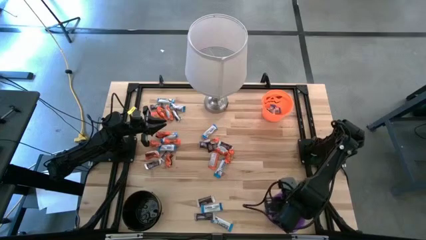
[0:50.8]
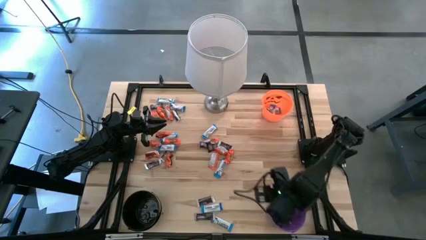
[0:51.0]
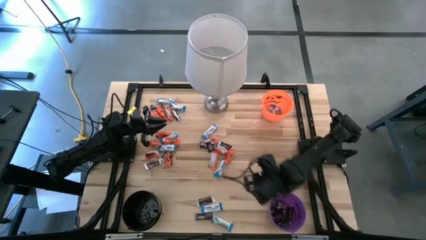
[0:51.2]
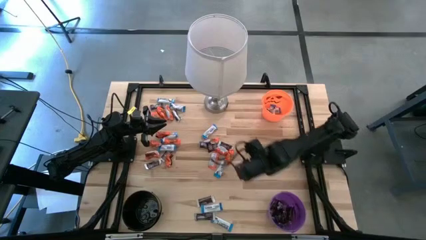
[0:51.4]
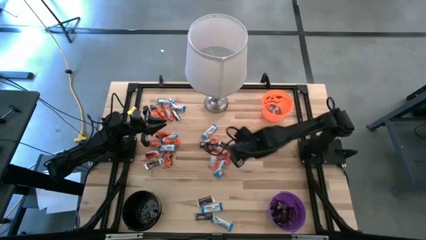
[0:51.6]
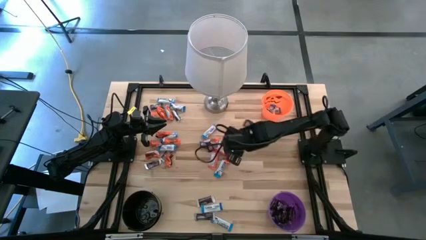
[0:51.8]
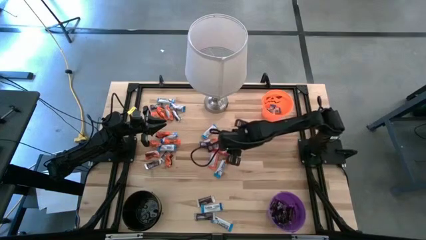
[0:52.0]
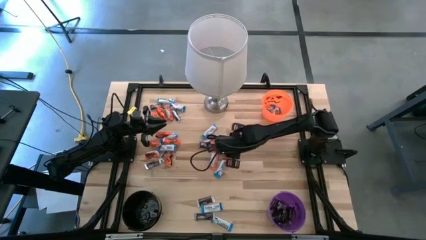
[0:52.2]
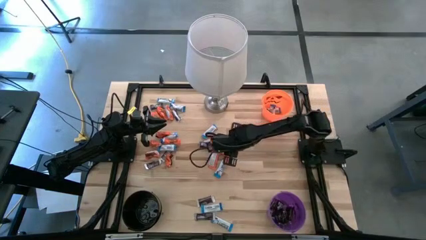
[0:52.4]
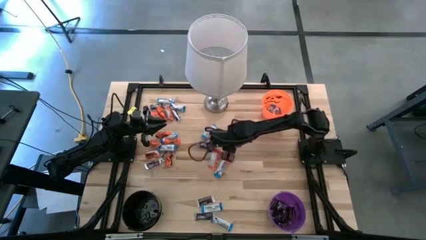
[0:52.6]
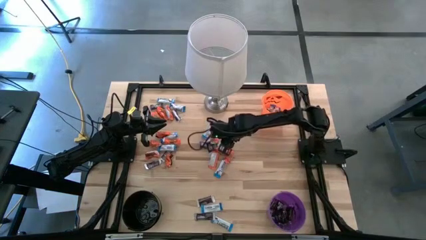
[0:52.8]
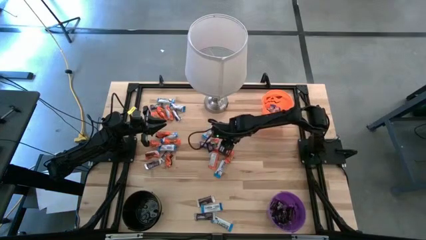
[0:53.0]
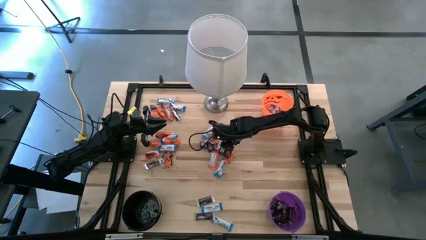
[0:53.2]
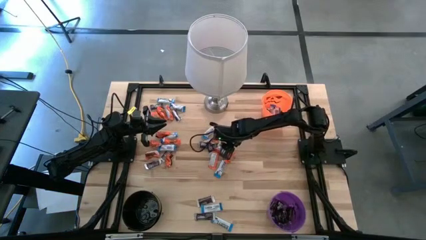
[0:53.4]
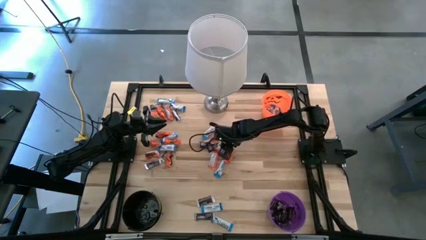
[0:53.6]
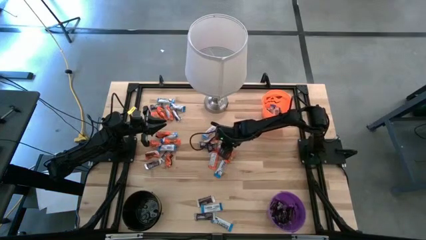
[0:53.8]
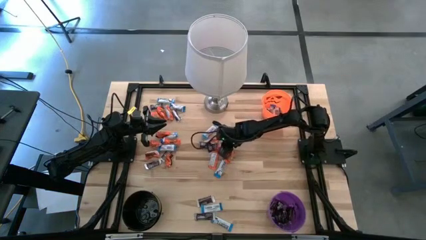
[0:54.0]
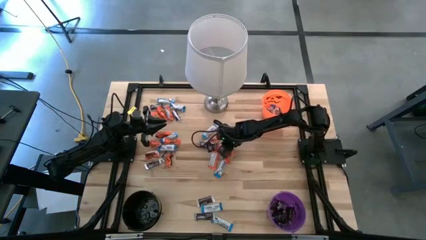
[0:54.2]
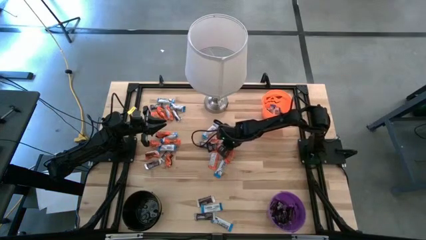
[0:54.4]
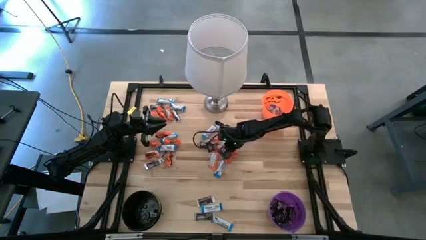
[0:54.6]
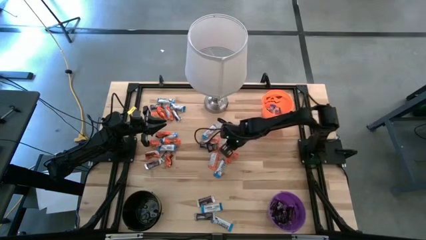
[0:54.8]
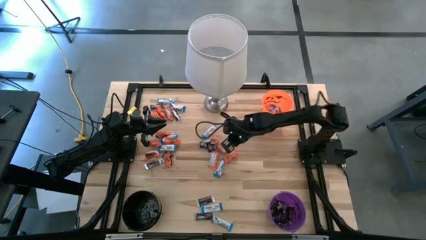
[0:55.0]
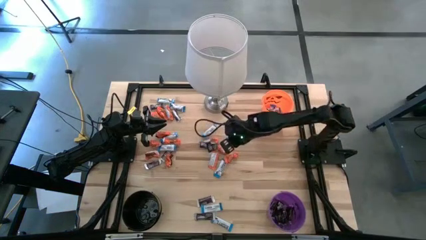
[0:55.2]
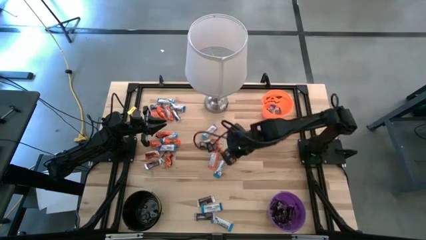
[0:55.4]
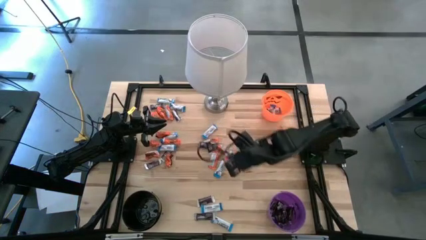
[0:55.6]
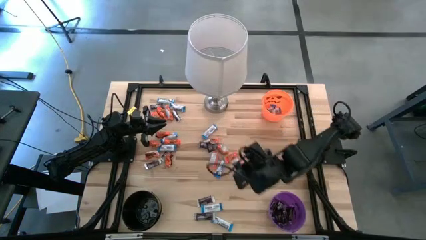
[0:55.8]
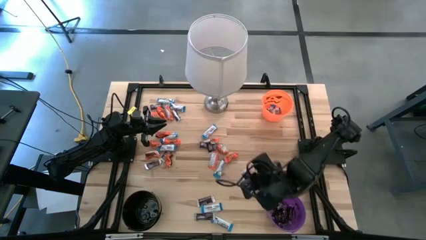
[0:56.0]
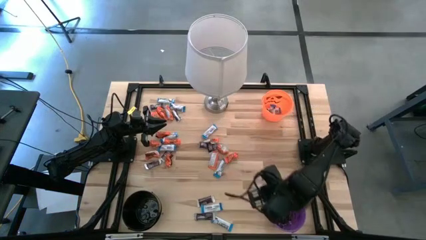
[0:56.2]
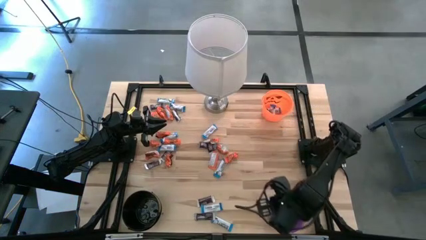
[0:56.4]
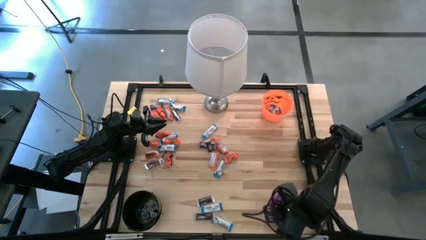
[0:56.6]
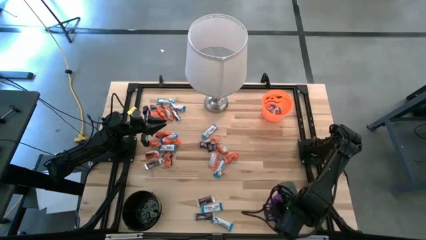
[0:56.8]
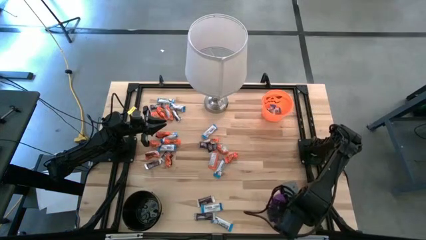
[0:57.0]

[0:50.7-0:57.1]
Task: Sort candy
Put the brown chocolate bar into the violet bucket

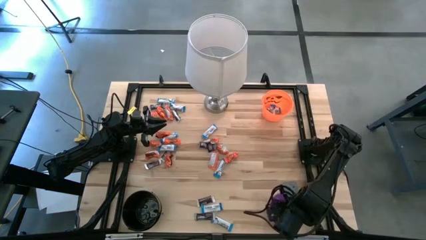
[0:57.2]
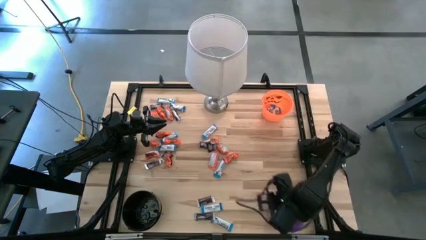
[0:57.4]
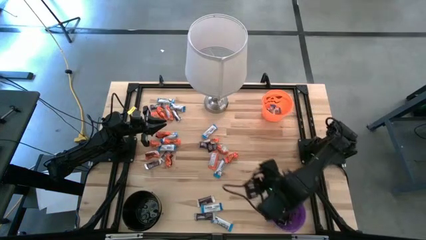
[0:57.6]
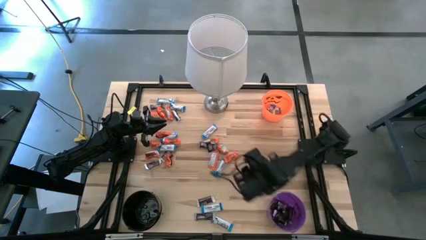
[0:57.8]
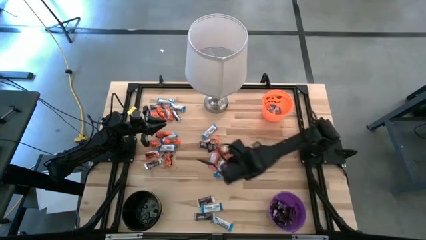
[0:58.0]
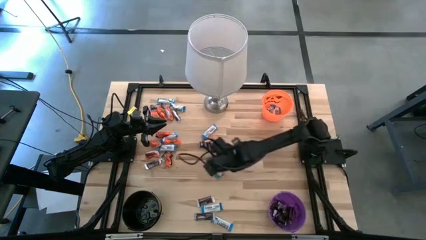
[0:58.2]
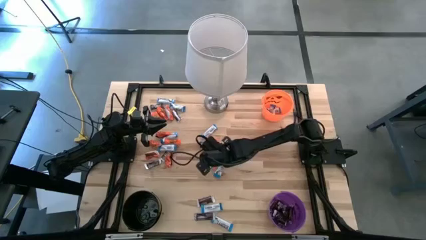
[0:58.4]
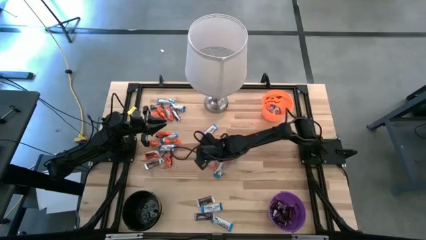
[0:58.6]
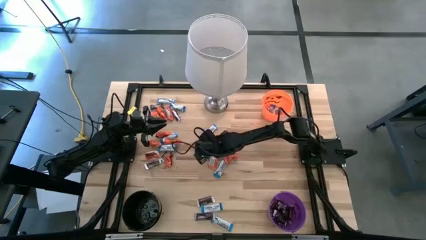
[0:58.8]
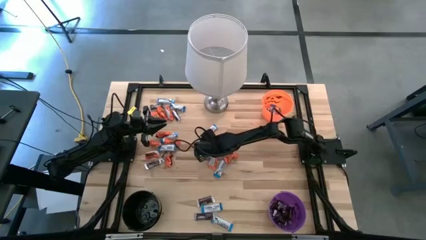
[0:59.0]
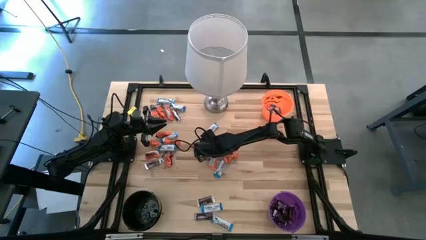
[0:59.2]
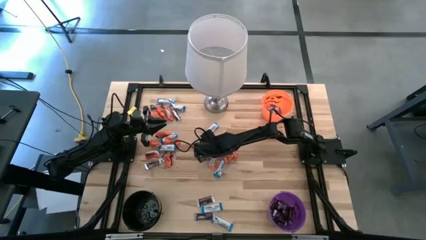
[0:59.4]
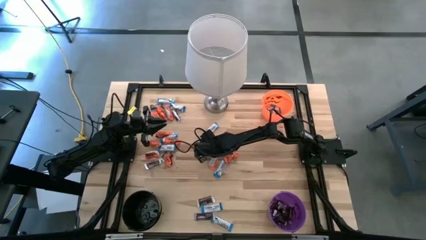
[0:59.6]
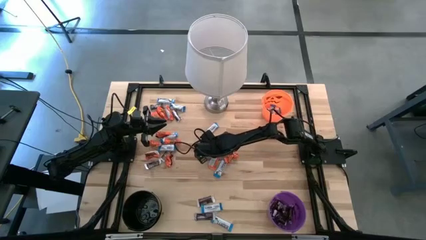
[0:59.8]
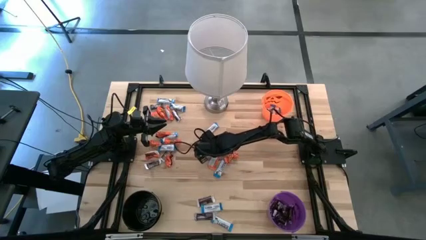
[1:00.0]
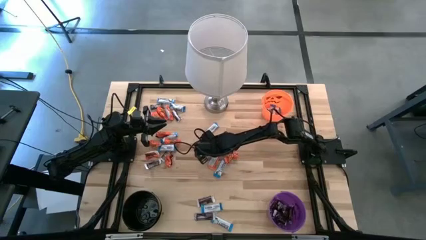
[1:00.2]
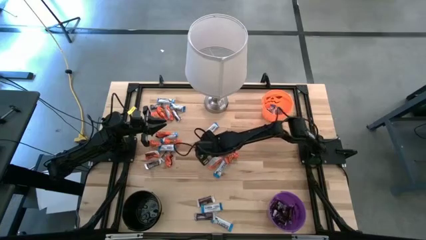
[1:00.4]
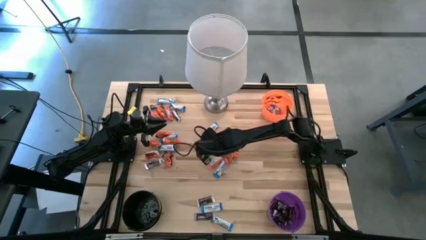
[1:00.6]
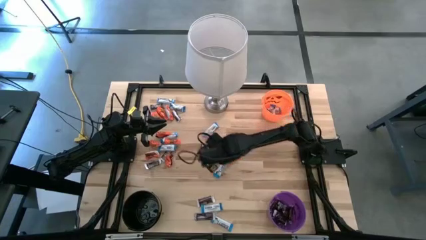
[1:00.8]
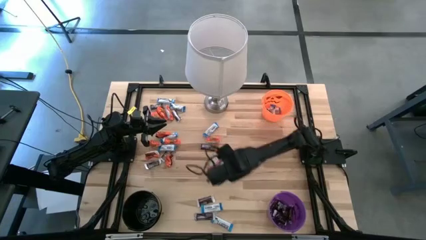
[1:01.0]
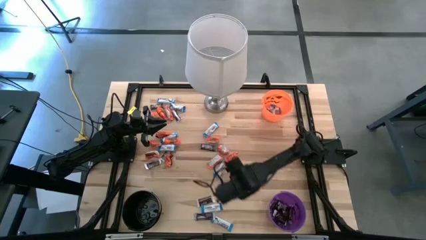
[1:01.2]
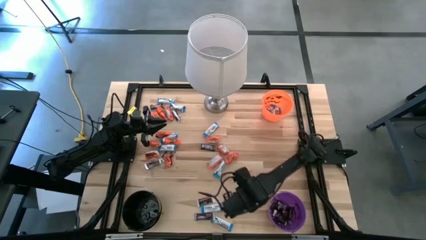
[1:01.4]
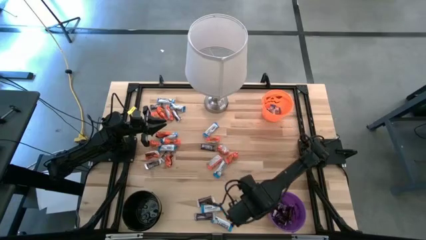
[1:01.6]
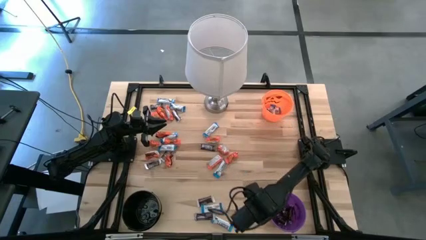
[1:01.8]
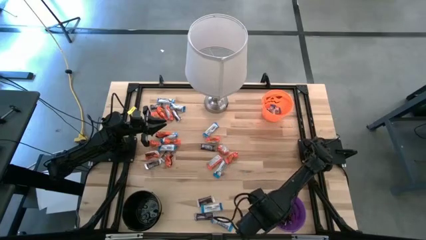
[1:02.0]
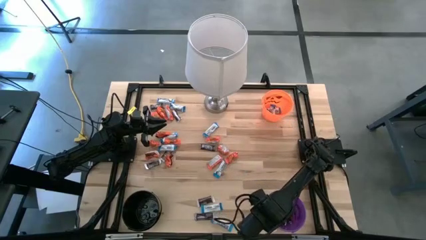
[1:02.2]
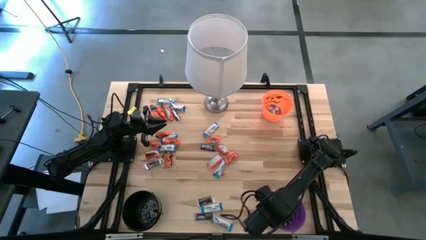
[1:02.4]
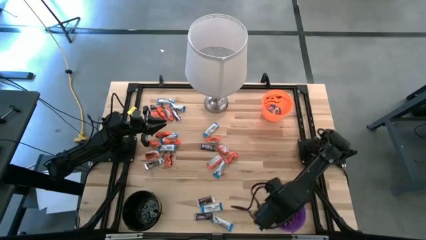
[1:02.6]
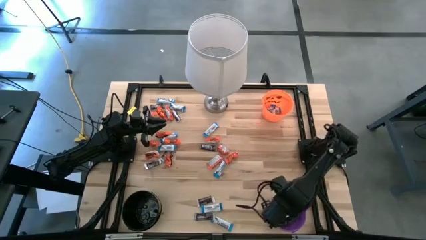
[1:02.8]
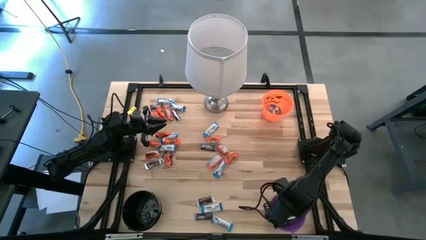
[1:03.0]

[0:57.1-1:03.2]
Put the brown chocolate bar into the violet bucket

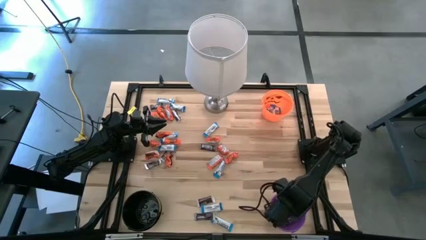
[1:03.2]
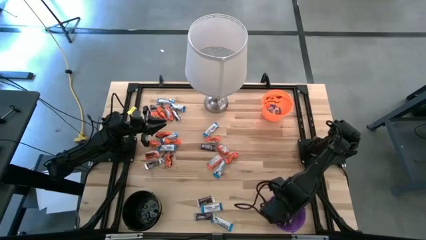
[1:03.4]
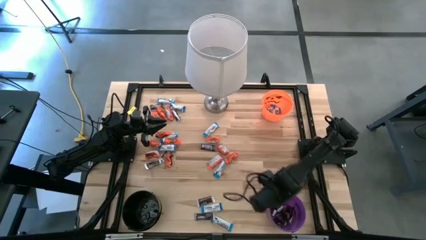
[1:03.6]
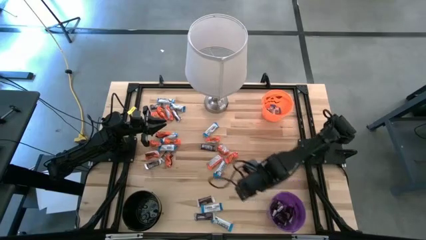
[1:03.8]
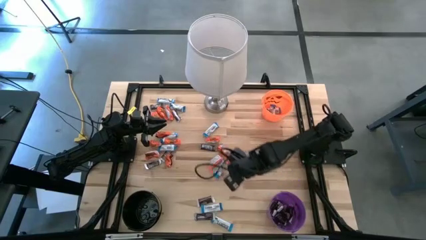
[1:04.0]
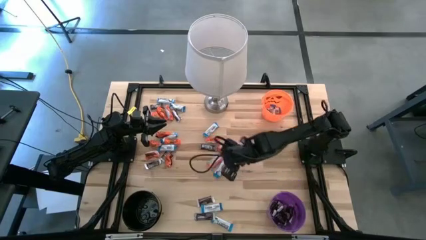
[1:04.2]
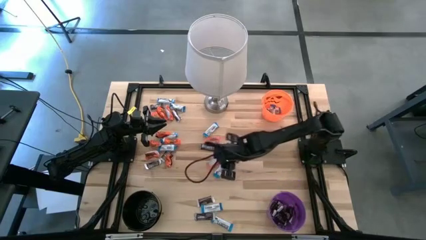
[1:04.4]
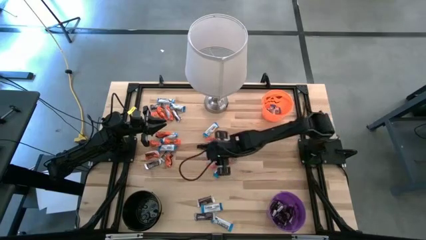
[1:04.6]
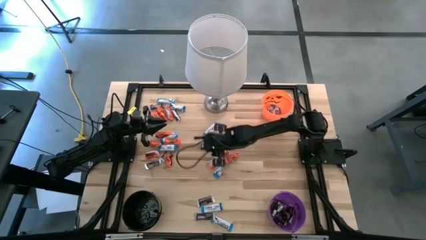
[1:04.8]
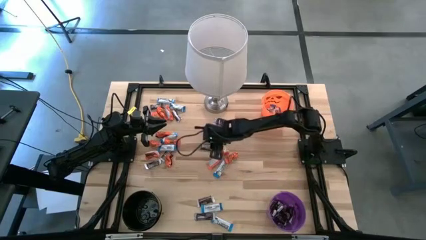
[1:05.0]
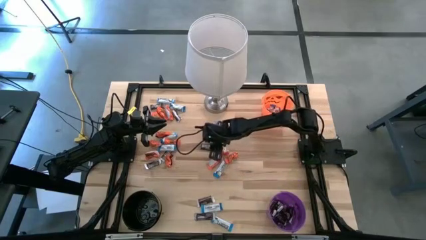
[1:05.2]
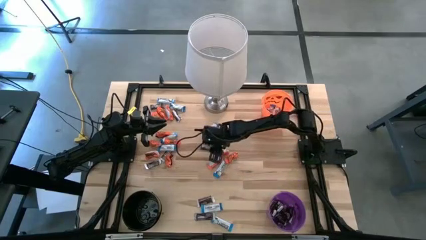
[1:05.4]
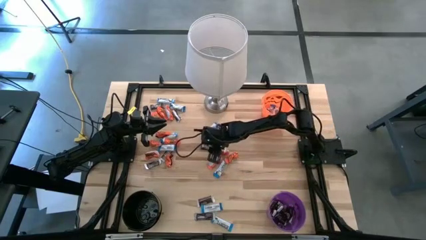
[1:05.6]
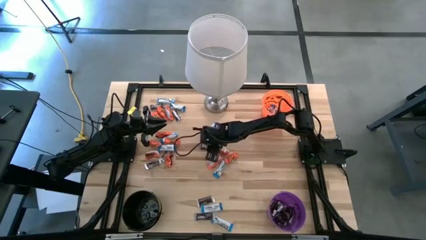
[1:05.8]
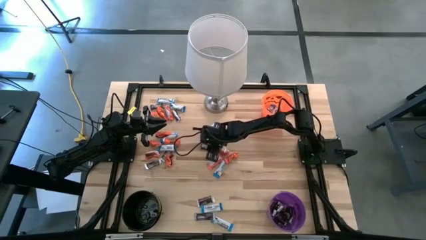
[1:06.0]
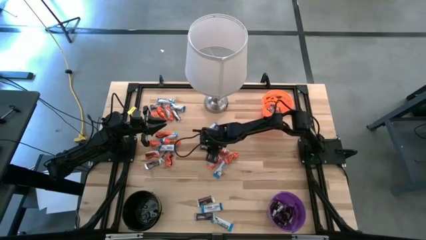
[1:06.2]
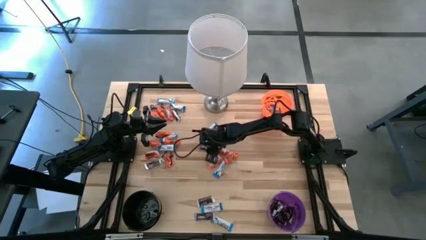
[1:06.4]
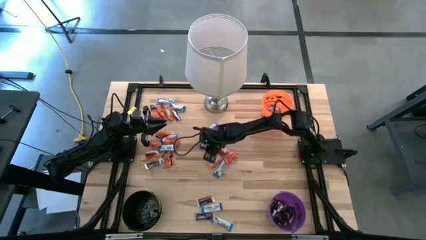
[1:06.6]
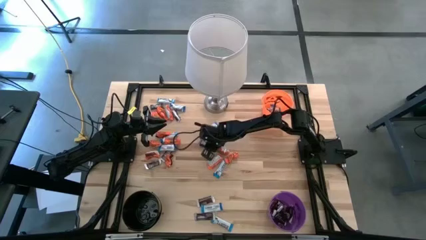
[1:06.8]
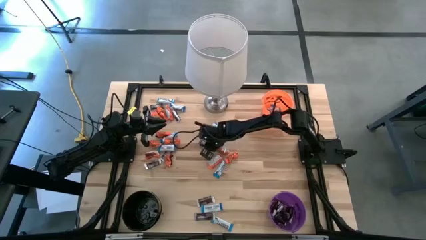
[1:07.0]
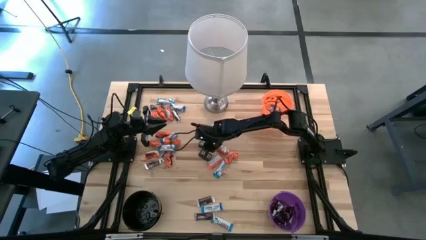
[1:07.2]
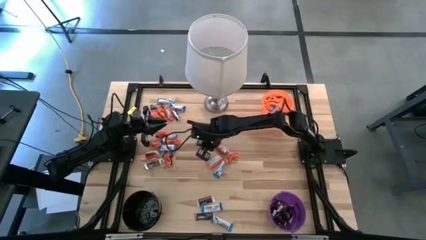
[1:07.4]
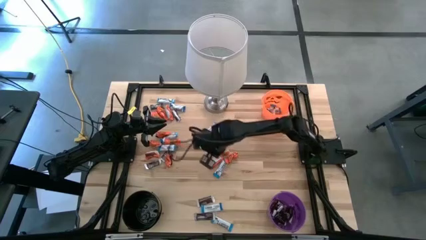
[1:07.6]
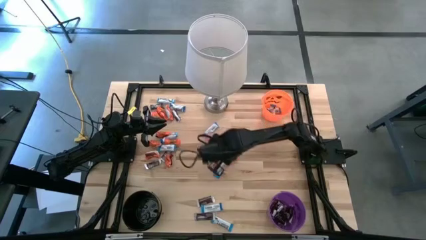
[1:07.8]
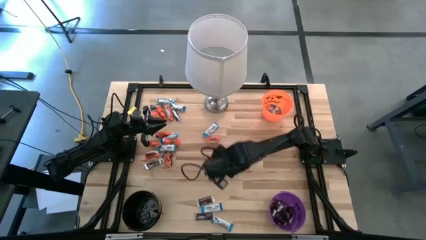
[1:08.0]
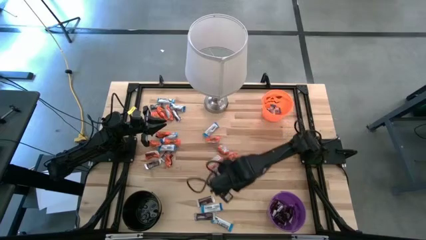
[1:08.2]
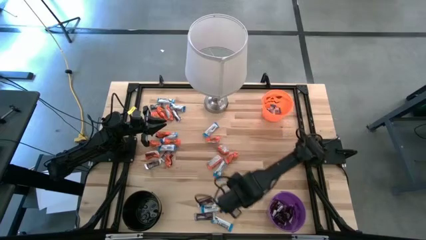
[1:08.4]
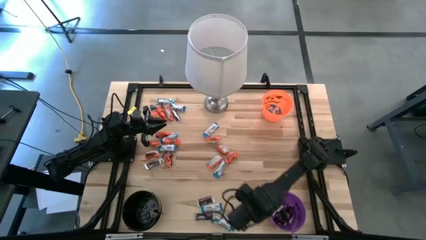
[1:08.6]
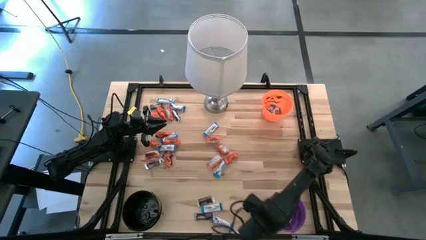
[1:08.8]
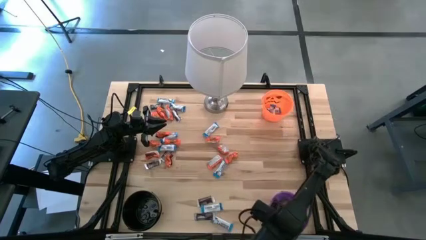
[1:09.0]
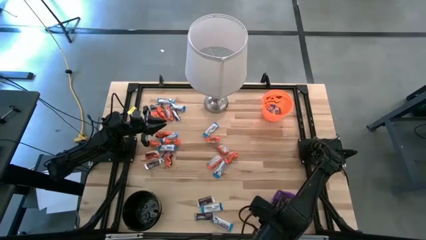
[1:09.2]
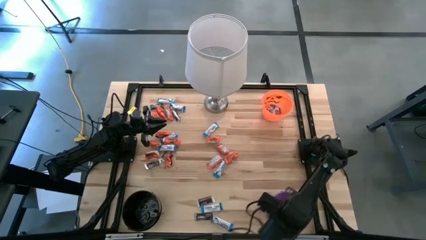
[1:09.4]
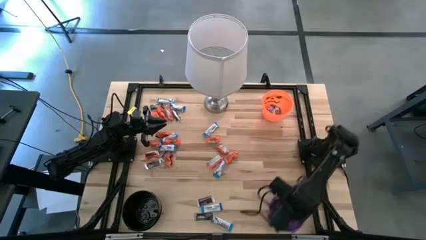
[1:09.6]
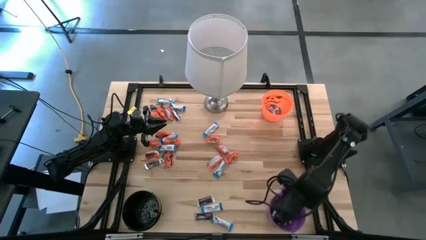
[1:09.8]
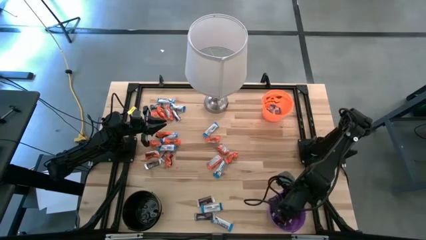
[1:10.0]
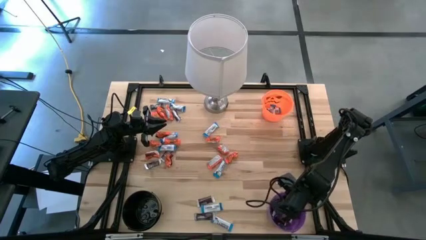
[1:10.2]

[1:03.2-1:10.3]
Put the brown chocolate bar into the violet bucket
